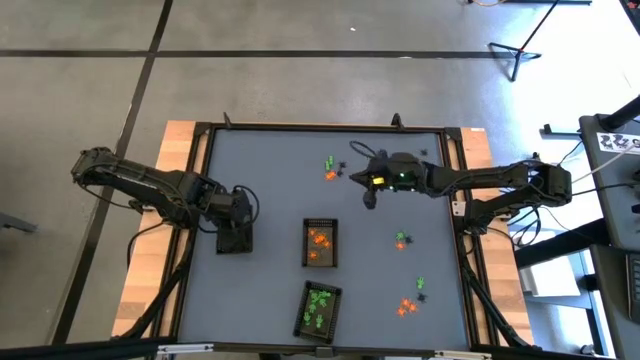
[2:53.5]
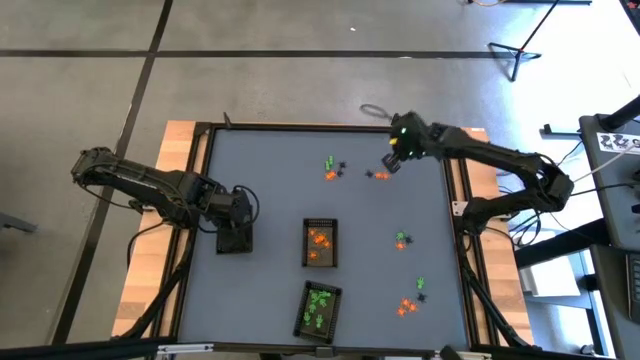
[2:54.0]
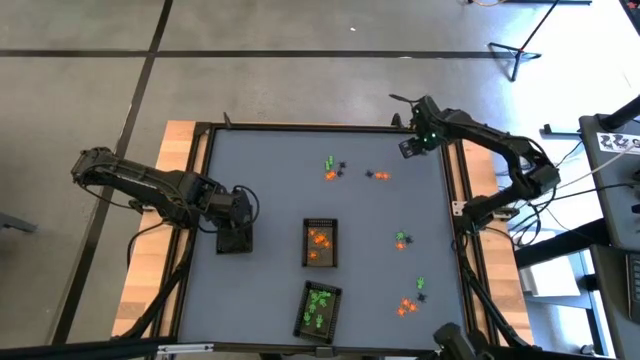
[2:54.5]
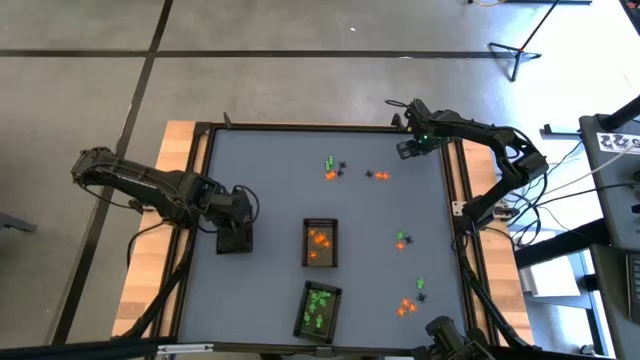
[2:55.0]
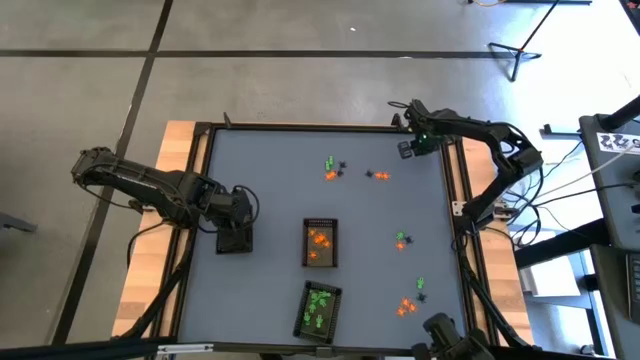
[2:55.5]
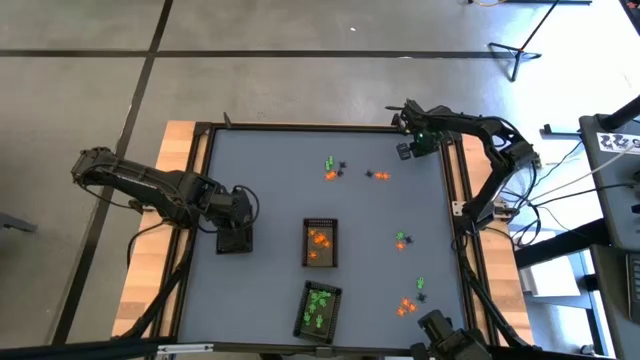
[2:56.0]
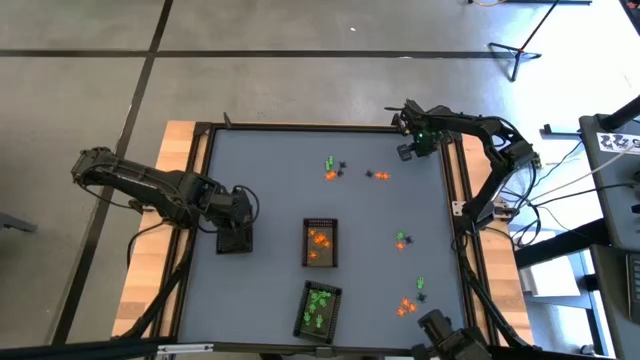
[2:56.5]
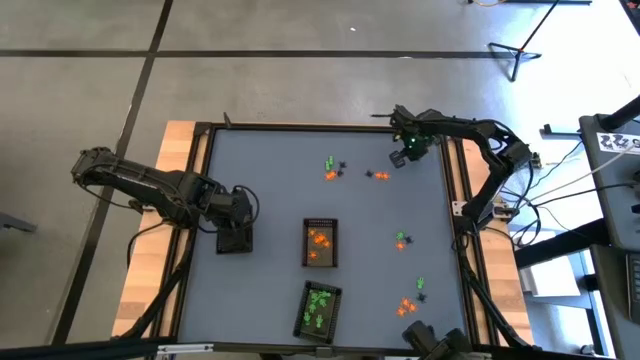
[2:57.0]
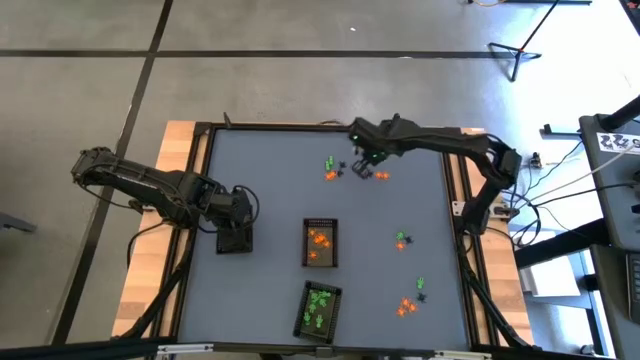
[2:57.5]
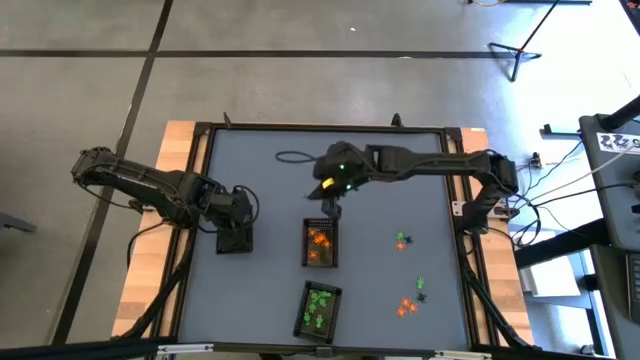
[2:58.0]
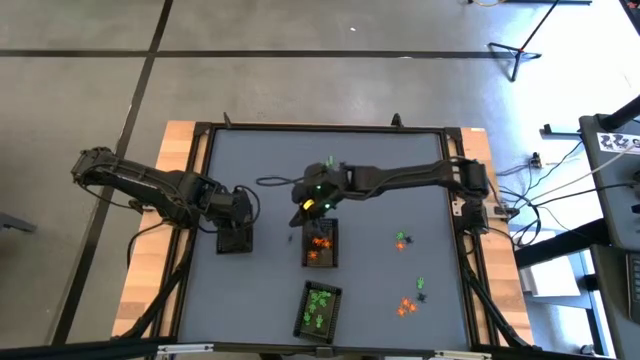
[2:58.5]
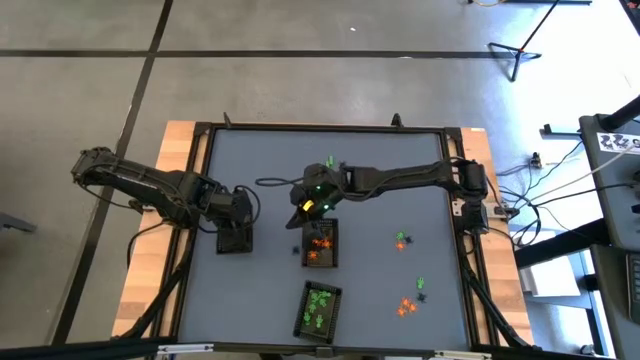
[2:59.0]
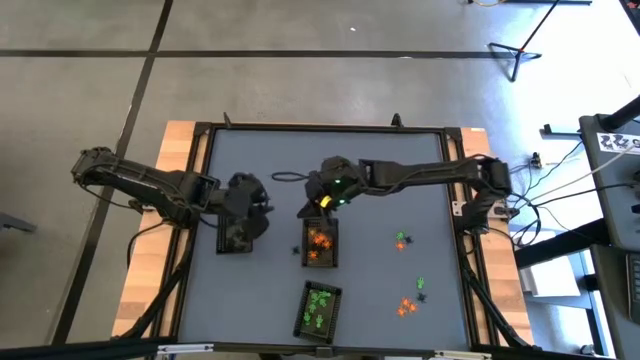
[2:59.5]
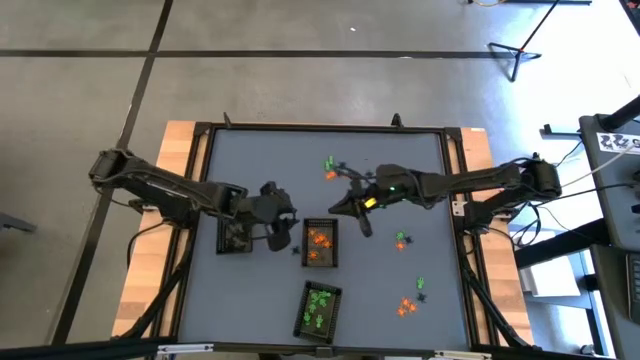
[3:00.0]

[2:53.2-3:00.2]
Task: Sort Halloween decoration
Put the black spider toy into the top left black basket

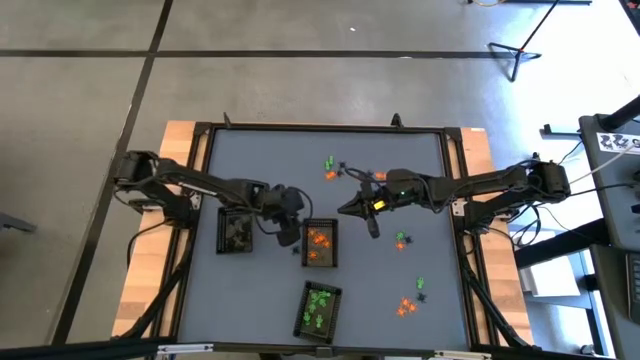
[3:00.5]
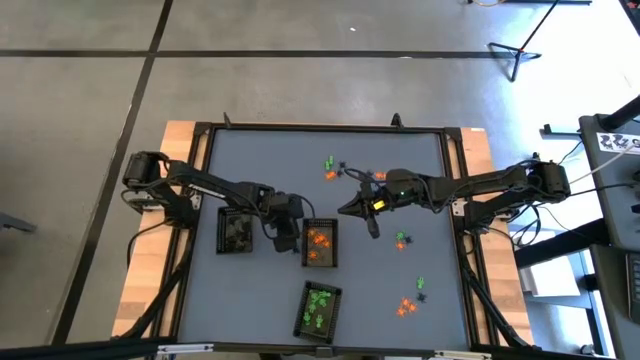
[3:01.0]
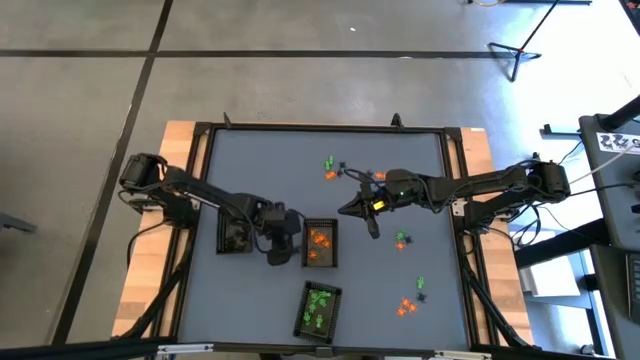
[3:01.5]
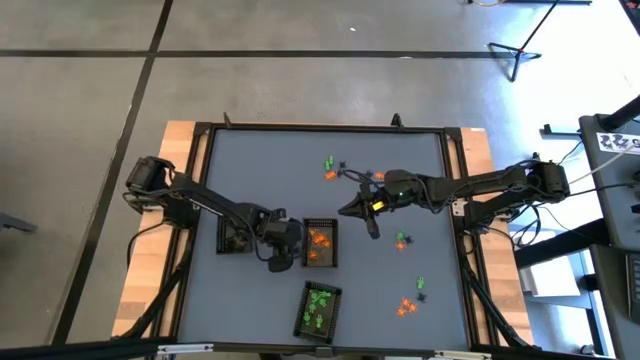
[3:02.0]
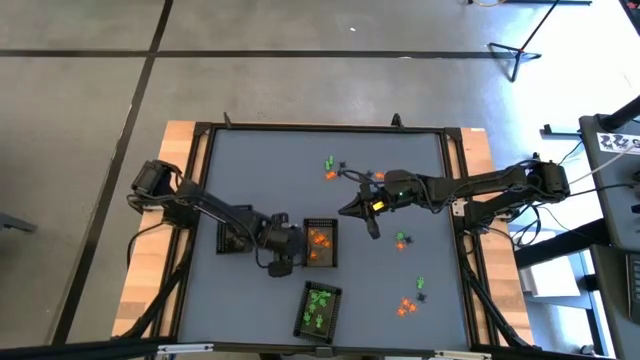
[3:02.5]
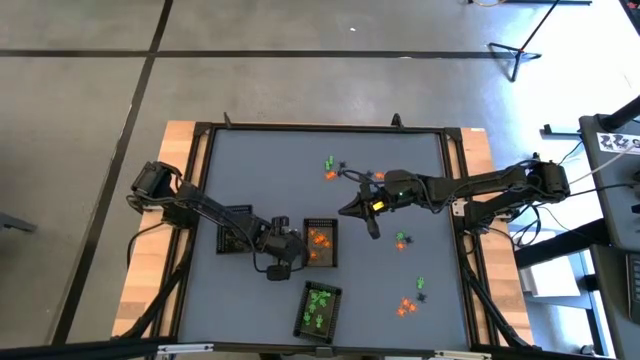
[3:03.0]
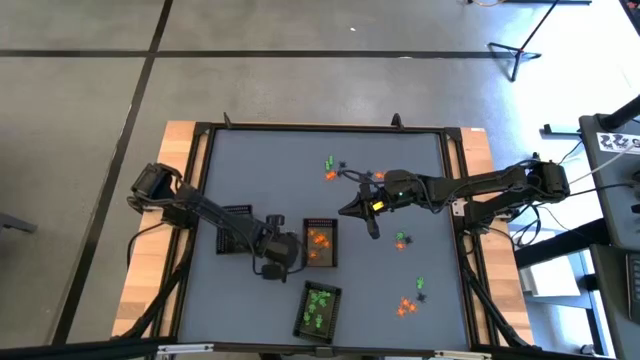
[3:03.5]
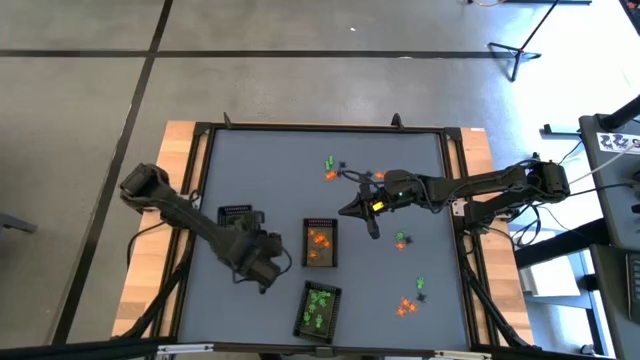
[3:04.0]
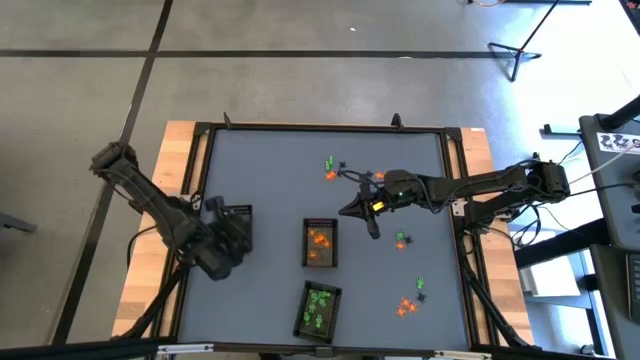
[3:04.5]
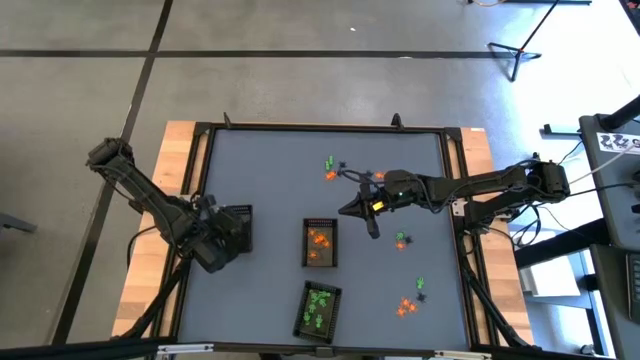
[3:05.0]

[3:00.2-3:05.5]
Put the black spider toy into the top left black basket

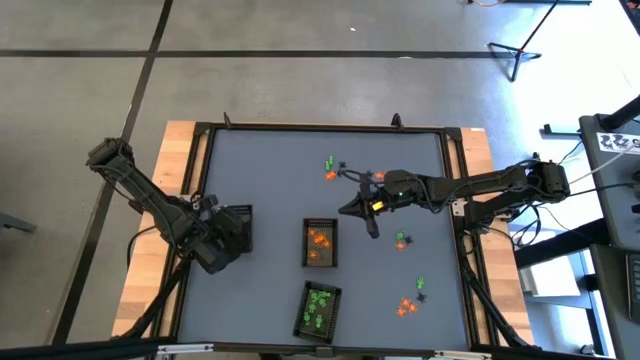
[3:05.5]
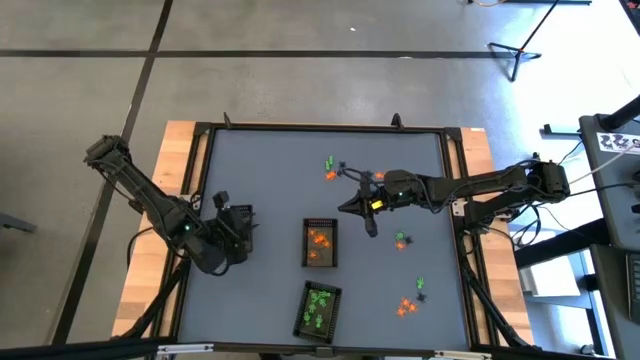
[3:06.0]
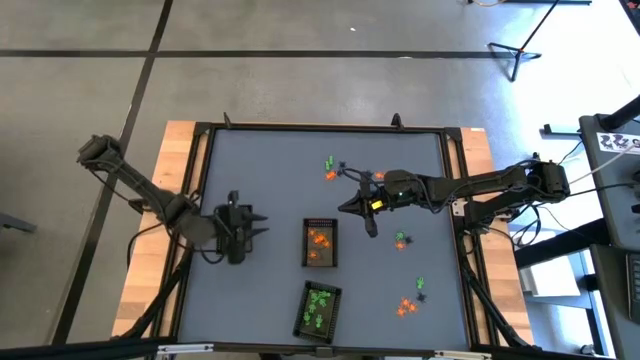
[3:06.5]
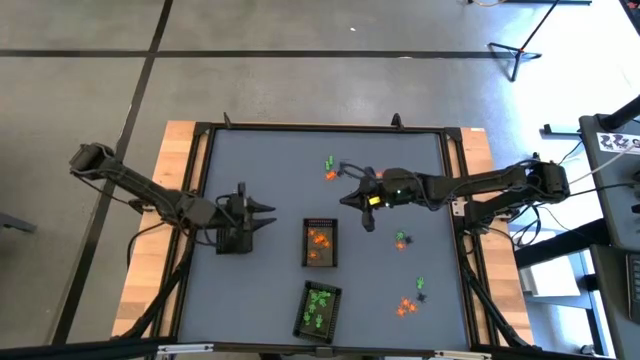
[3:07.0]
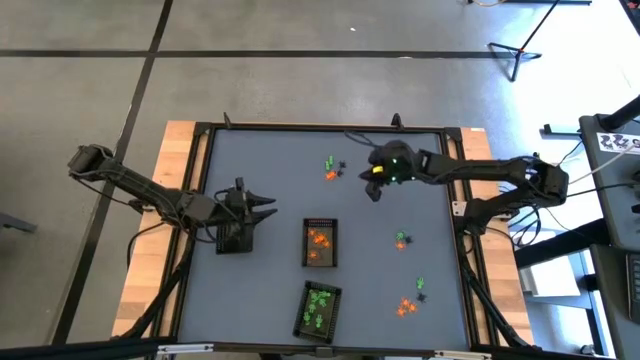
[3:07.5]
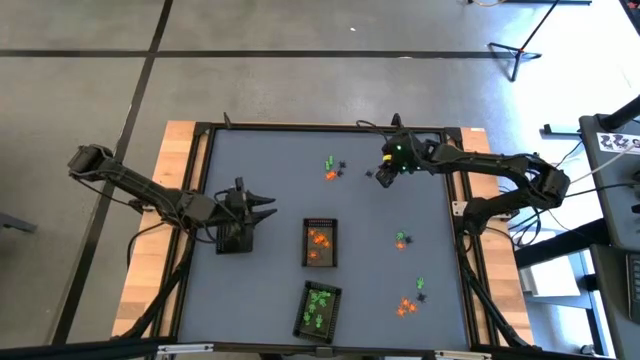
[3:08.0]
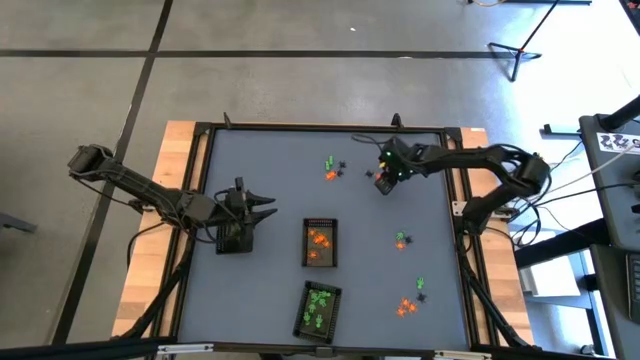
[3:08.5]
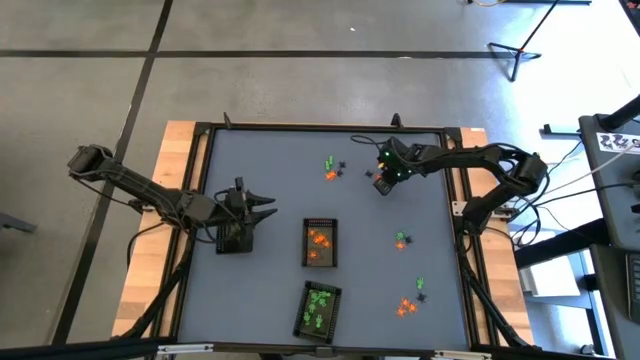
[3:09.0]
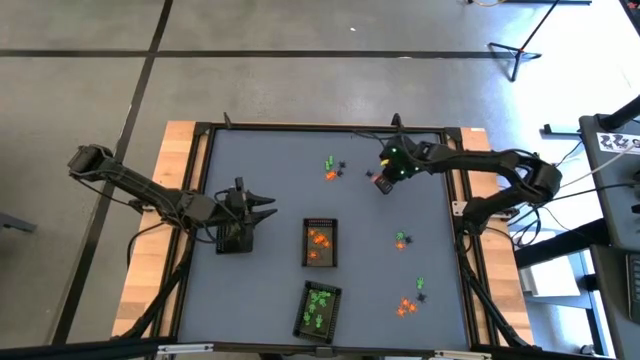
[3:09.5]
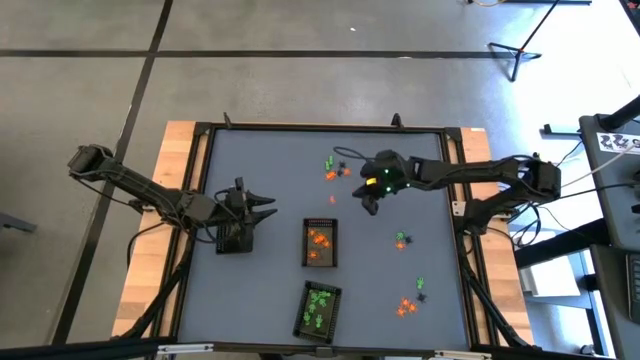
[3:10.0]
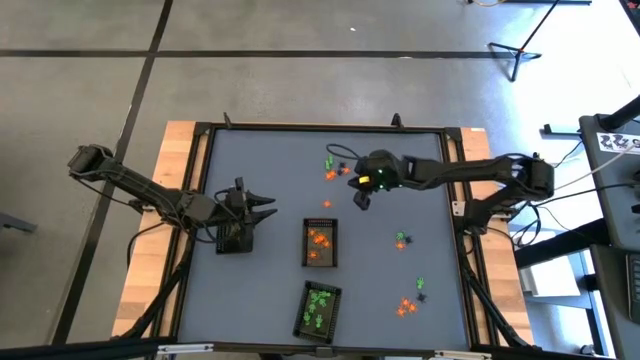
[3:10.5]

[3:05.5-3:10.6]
Put the orange spider toy into the top right black basket

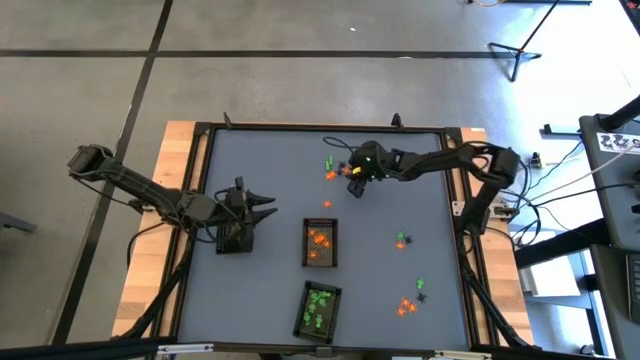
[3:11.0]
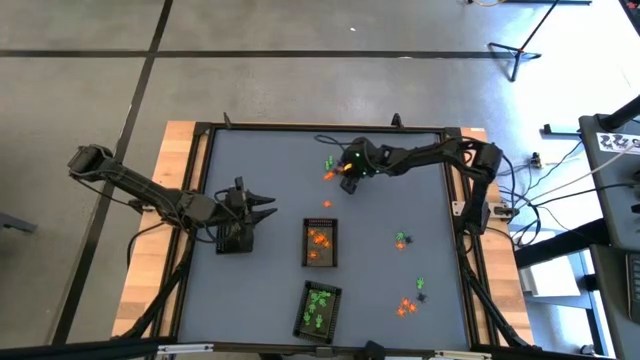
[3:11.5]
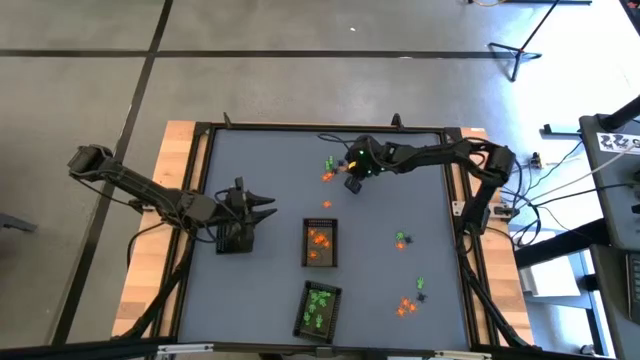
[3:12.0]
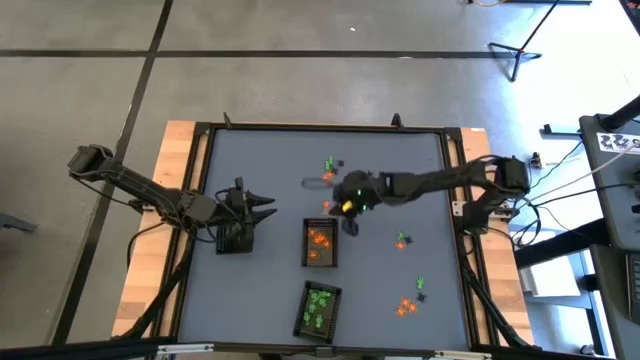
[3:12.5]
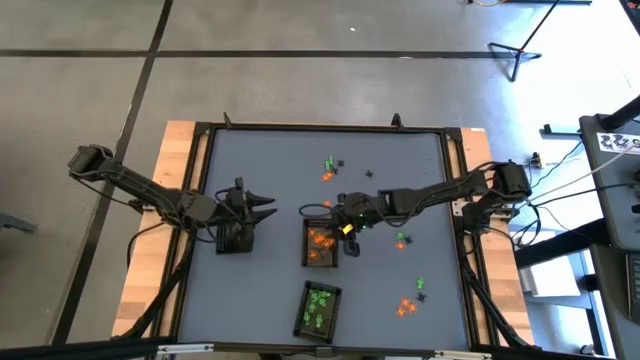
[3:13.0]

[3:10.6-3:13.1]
Put the orange spider toy into the top right black basket

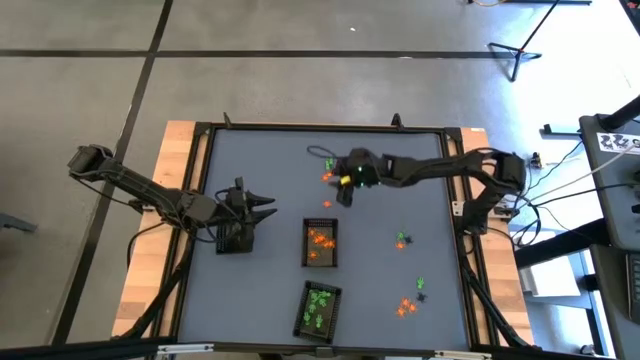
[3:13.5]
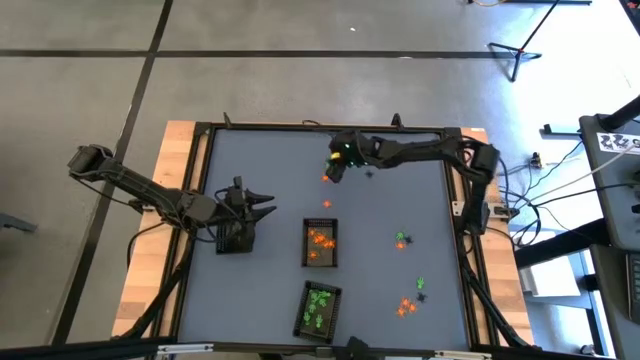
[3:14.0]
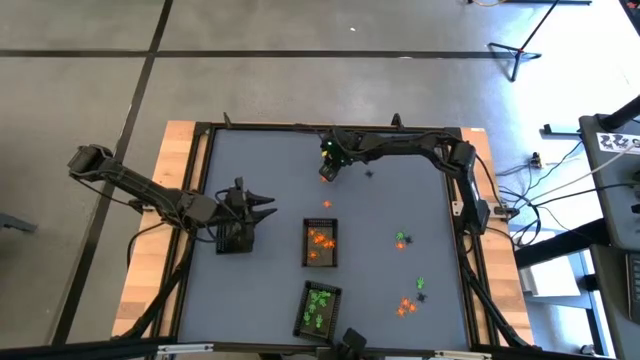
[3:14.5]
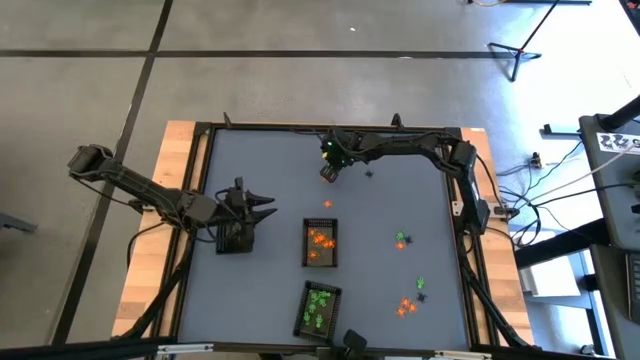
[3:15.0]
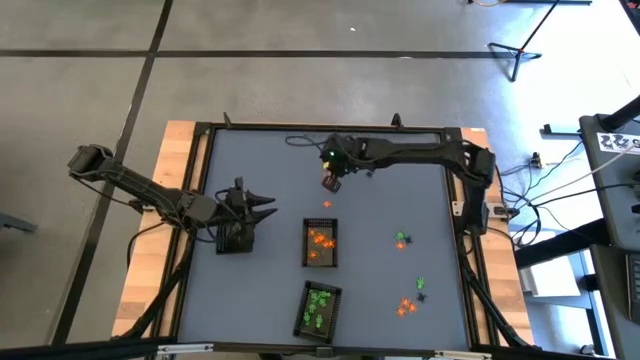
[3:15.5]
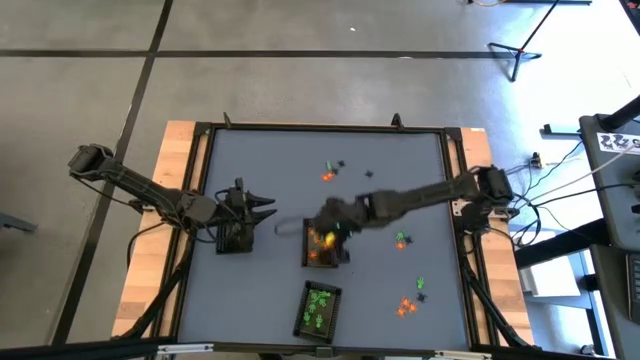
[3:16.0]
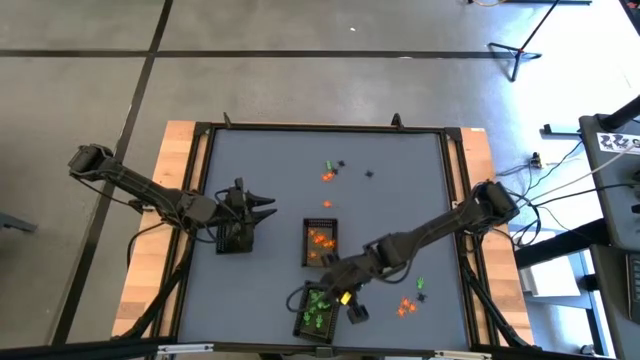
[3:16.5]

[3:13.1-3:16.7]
Put the green toy skeleton into the bottom black basket
